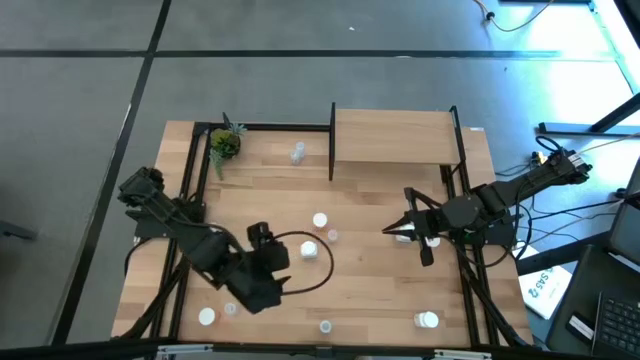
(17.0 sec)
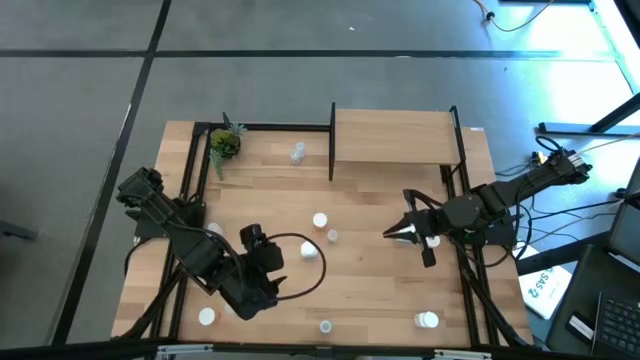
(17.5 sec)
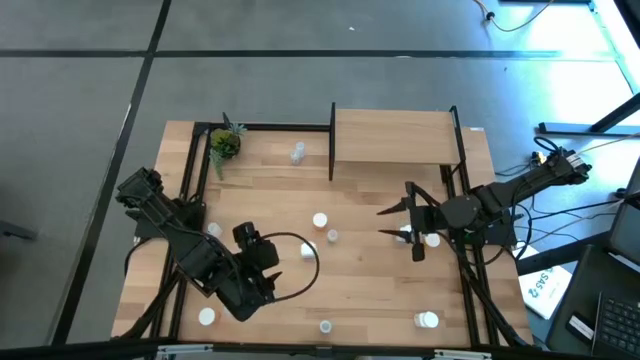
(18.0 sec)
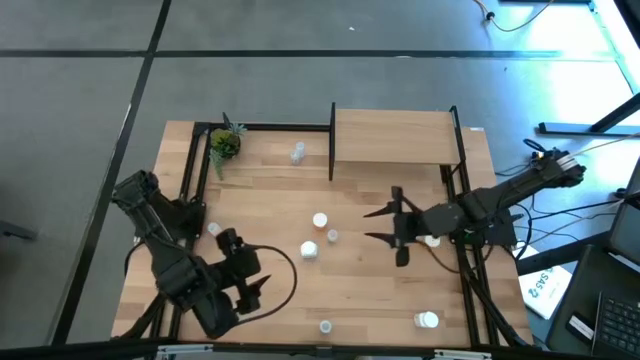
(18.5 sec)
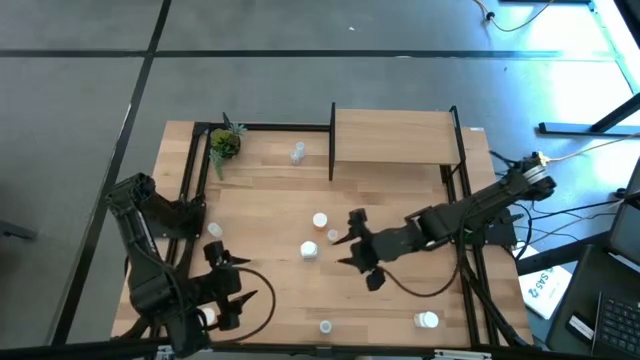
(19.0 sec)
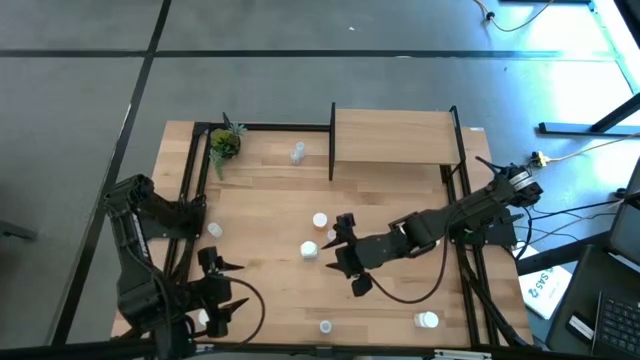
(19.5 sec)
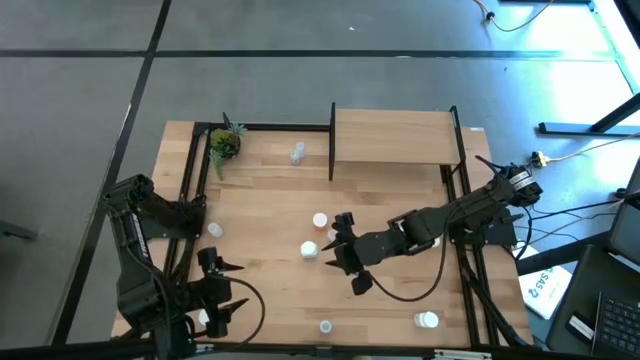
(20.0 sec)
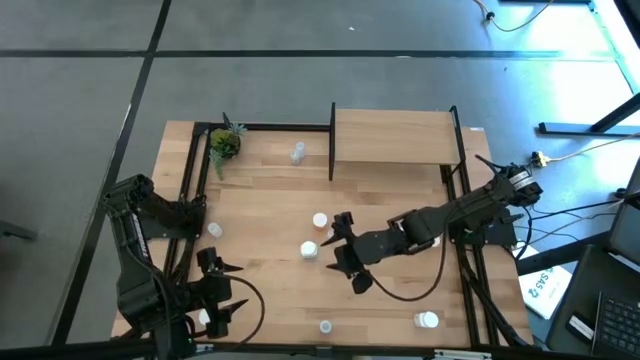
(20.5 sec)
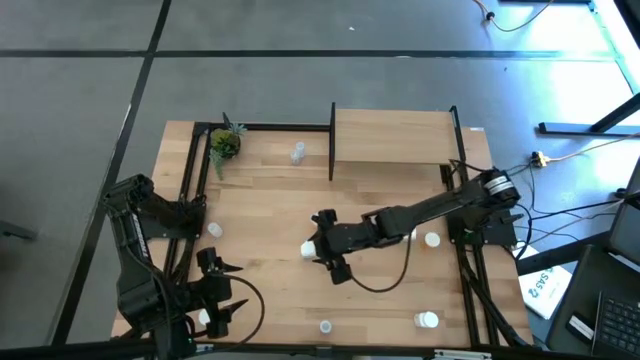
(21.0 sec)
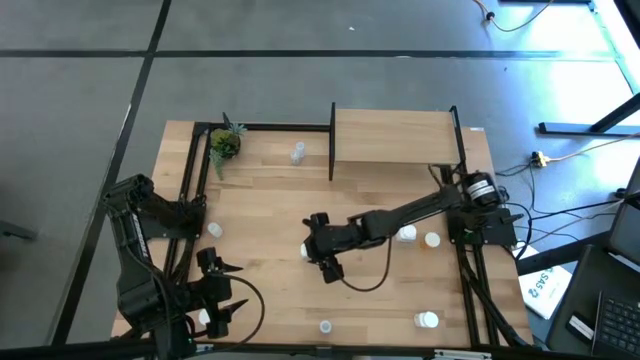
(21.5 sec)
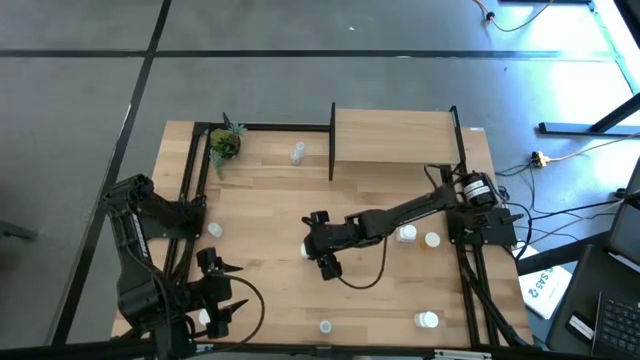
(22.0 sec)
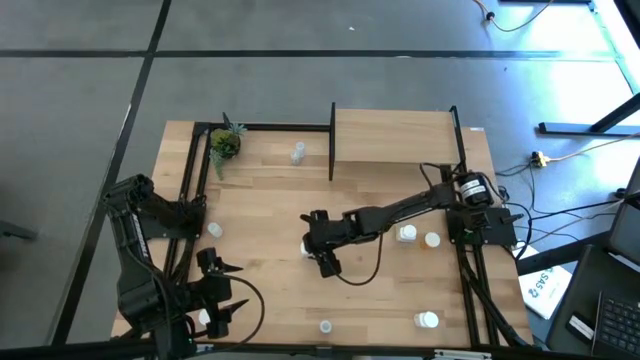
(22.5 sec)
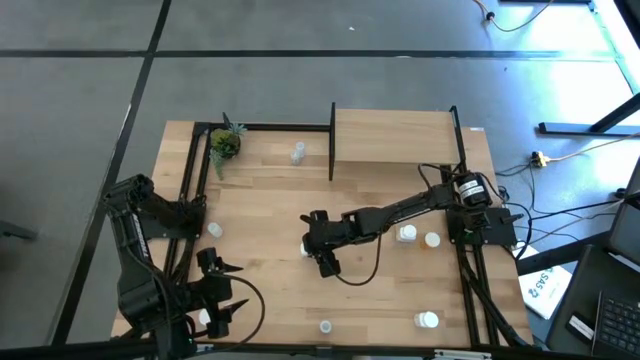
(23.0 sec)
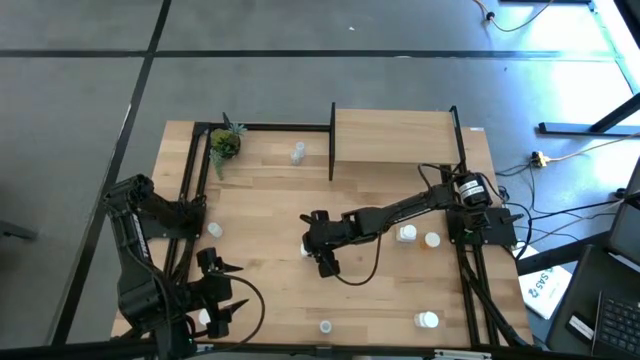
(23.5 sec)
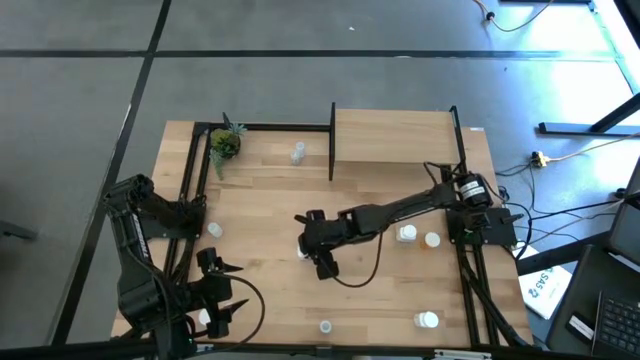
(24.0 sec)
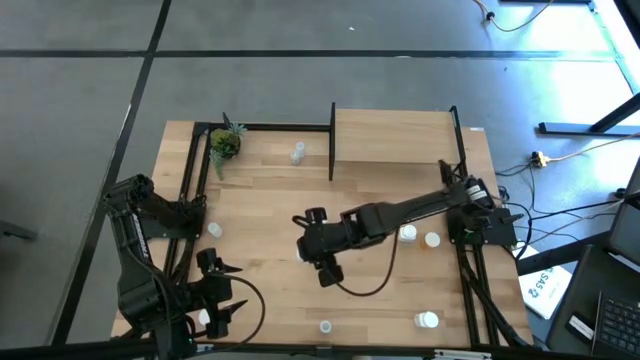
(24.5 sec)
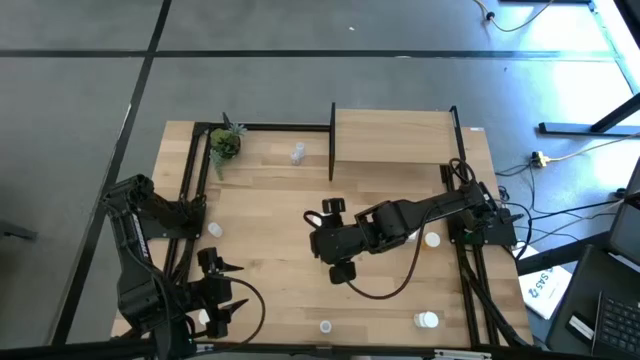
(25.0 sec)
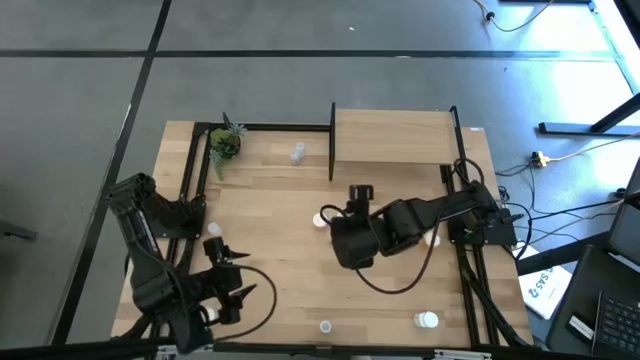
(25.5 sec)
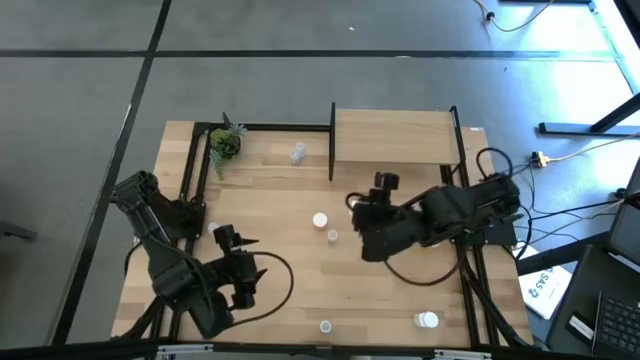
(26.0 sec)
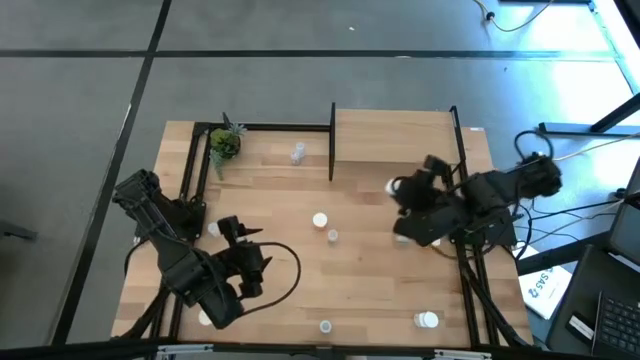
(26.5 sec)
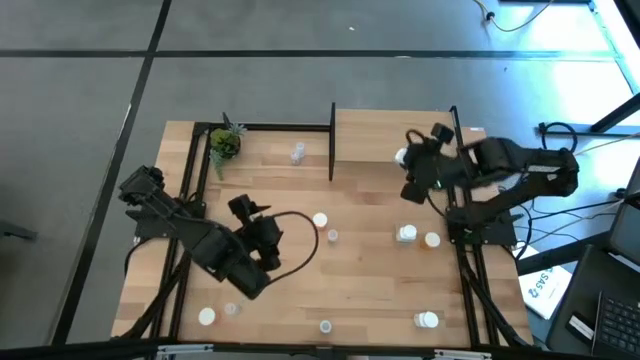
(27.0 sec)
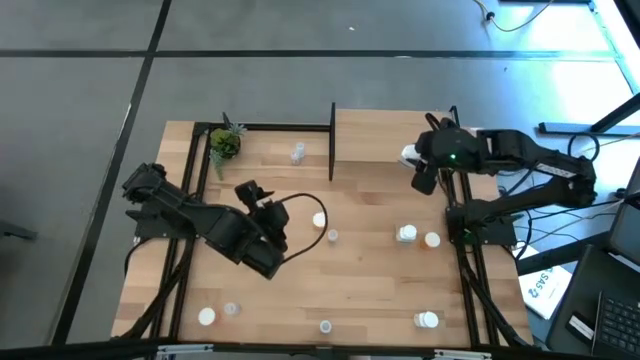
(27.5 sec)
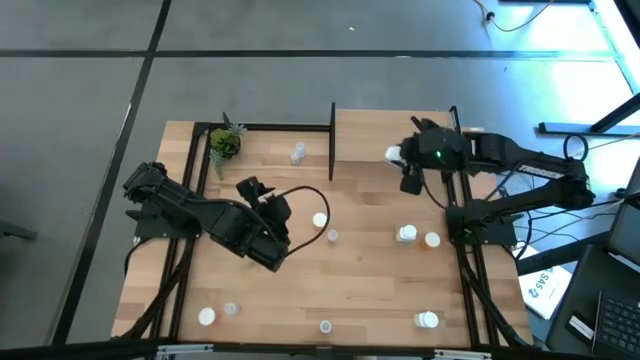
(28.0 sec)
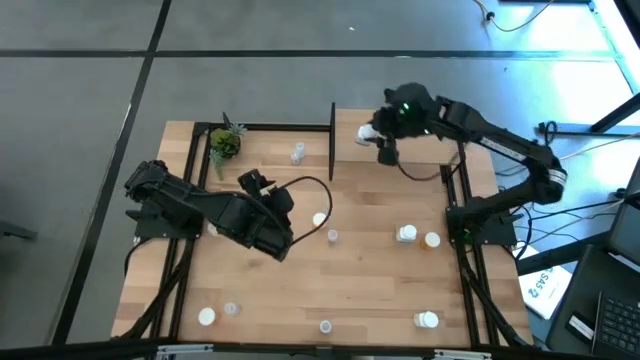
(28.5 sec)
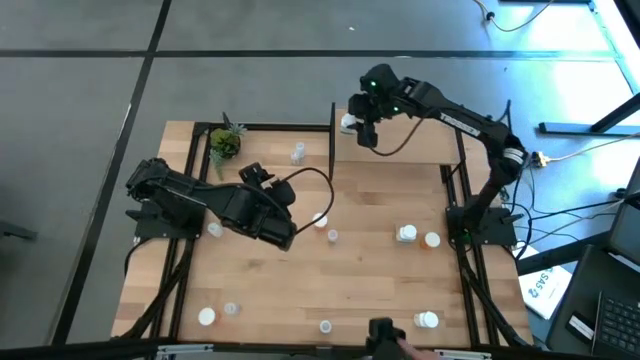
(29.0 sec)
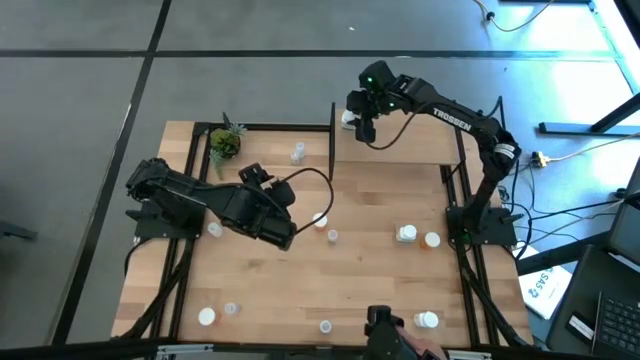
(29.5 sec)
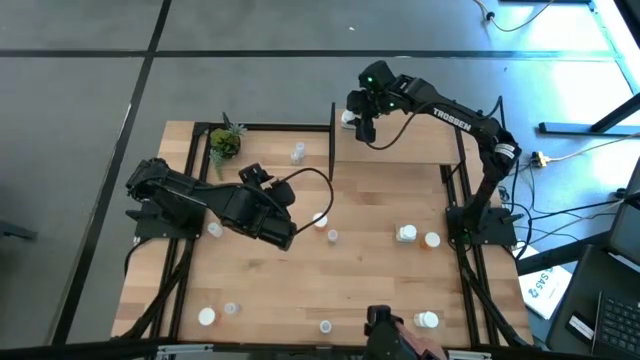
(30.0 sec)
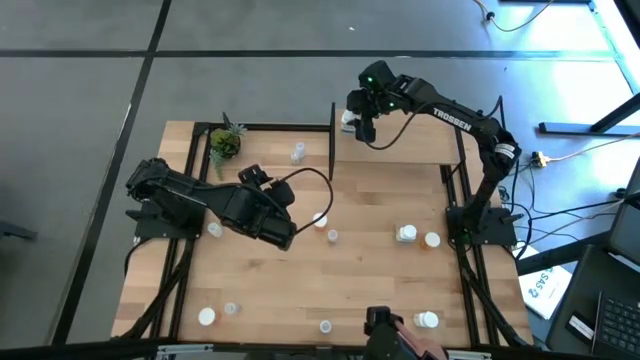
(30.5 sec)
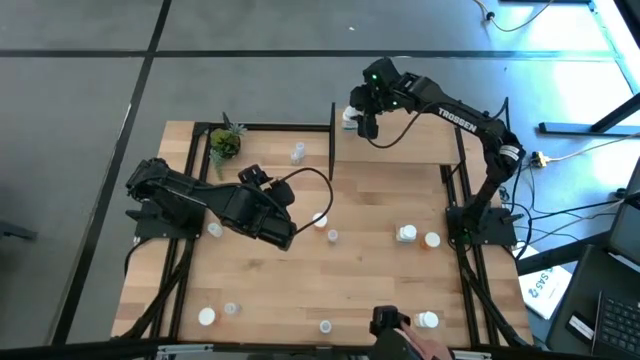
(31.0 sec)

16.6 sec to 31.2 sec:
Task: Pick and place medicine bottles onto shelf by color
Put the left white pill bottle on the shelf

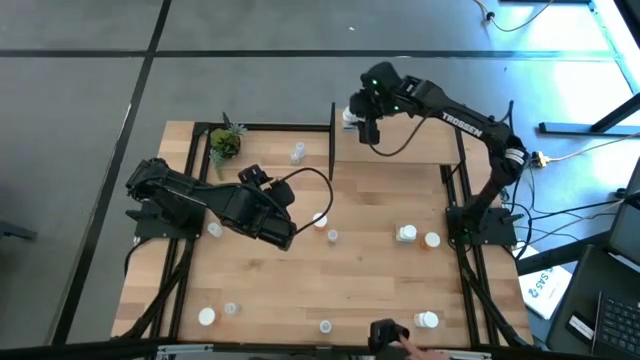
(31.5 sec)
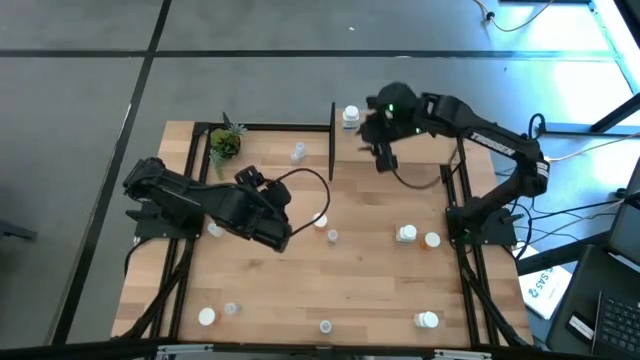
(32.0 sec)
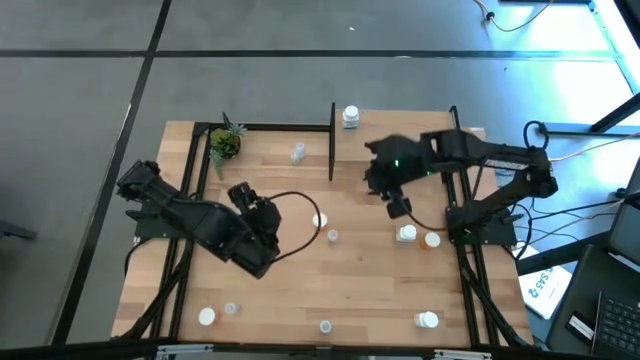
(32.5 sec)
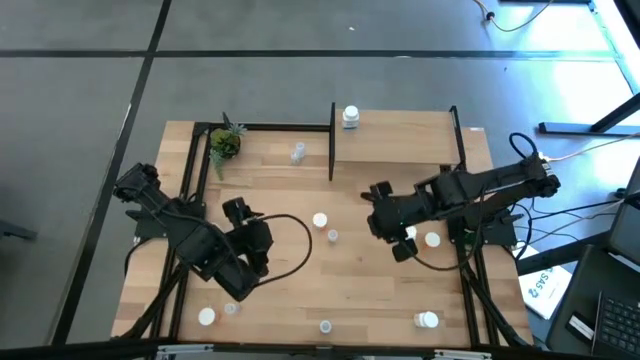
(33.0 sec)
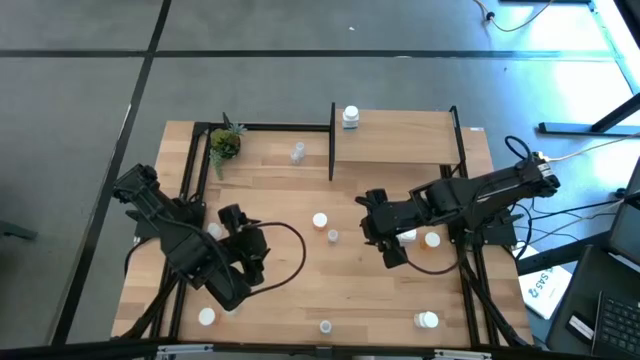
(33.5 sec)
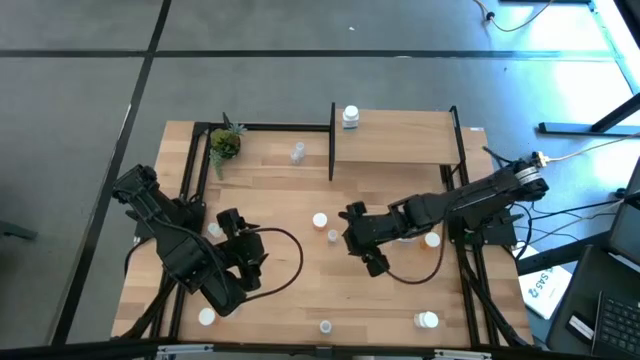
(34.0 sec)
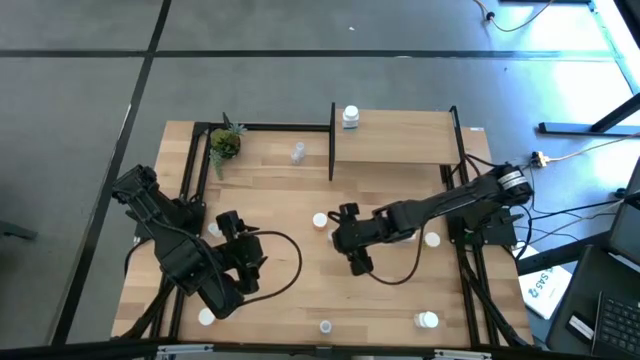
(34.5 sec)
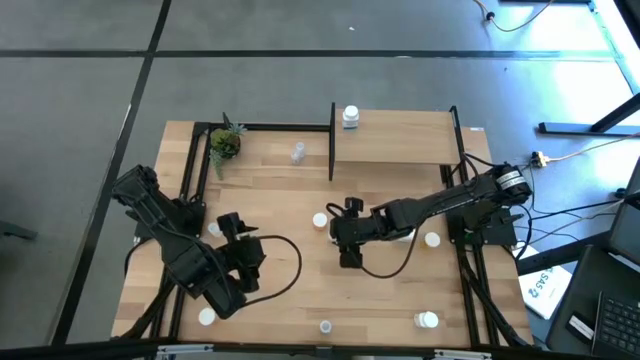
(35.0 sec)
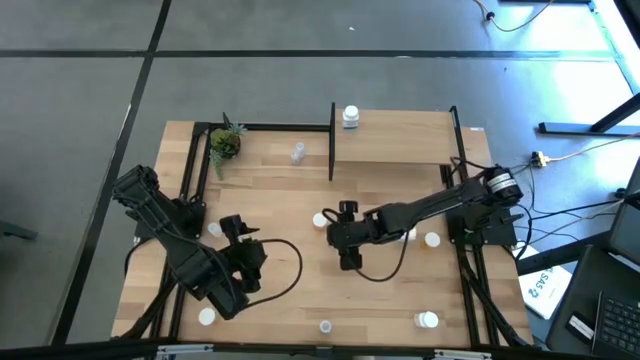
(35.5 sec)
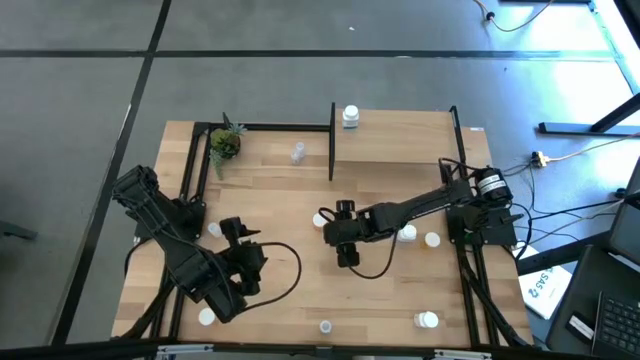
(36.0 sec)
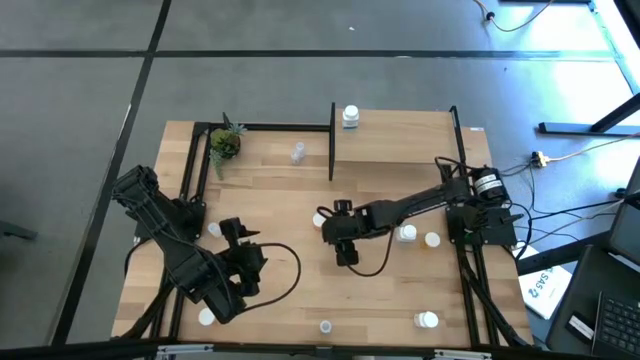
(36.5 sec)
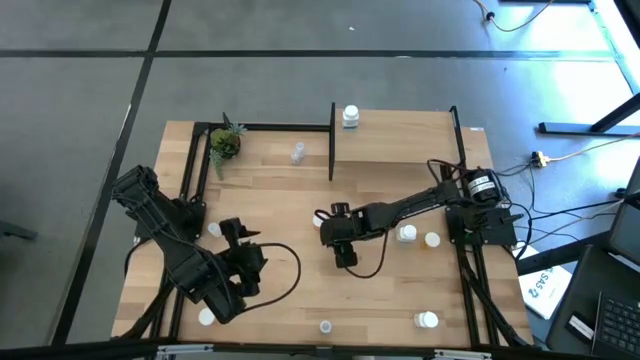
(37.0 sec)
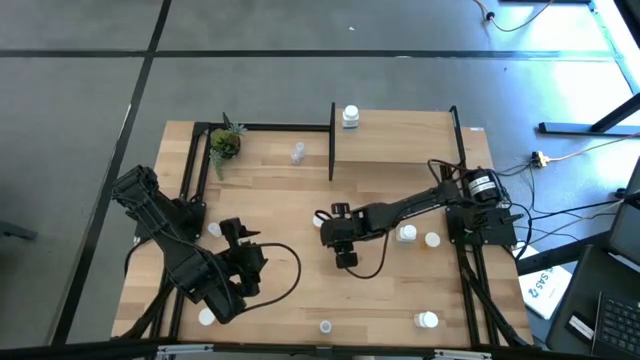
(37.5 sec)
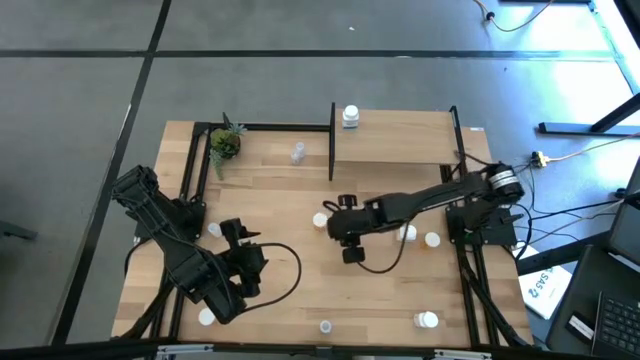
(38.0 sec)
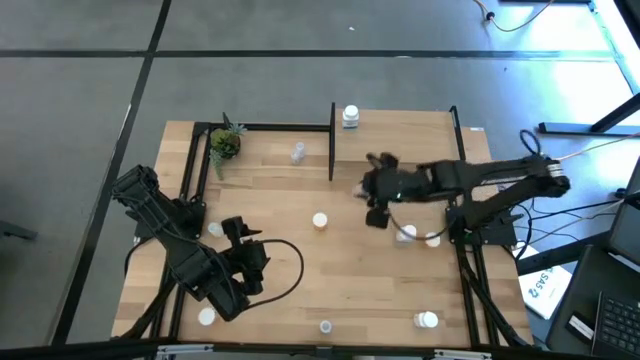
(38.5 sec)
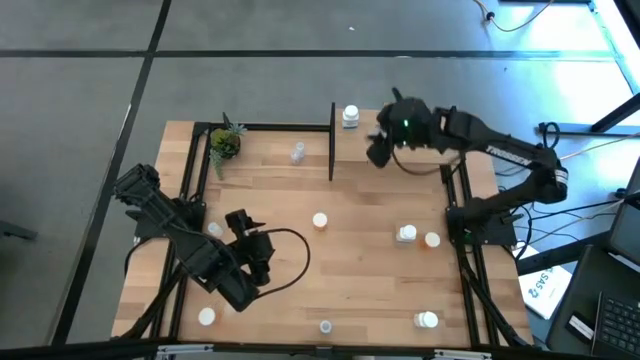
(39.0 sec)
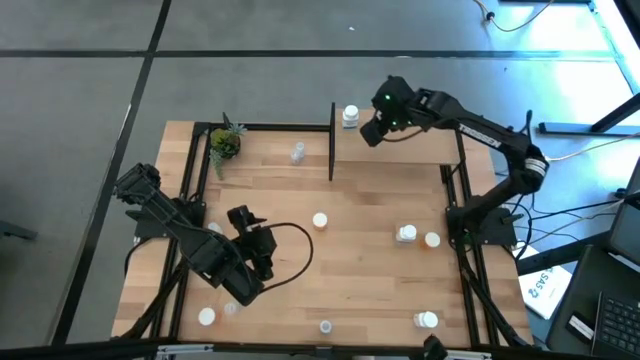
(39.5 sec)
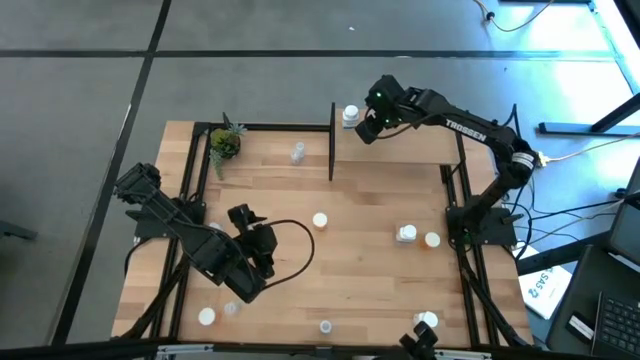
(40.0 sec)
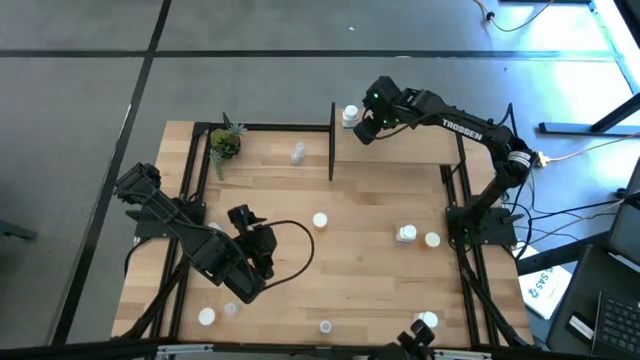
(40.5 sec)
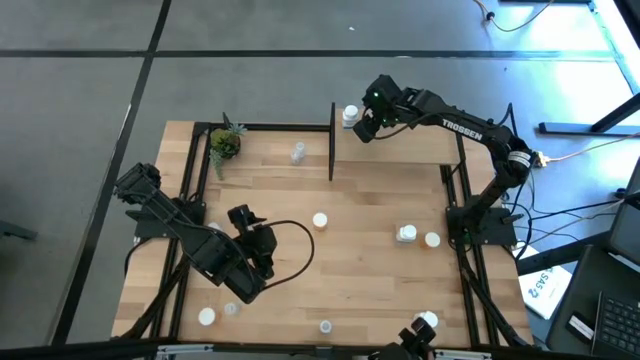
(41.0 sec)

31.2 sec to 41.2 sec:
Put the center green transparent pill bottle on the shelf
